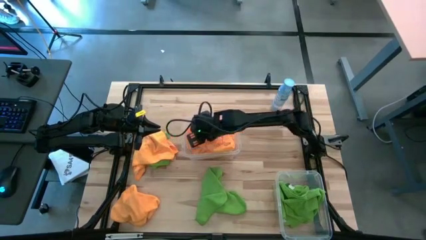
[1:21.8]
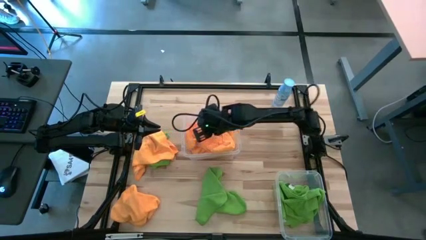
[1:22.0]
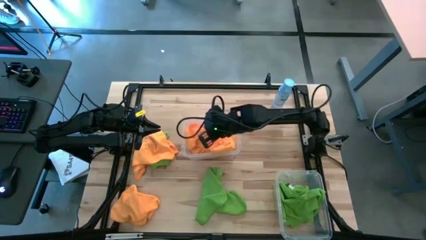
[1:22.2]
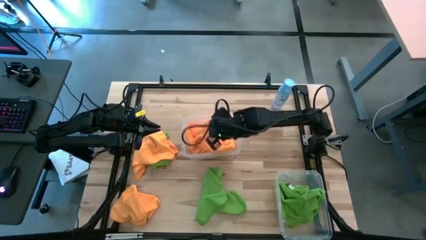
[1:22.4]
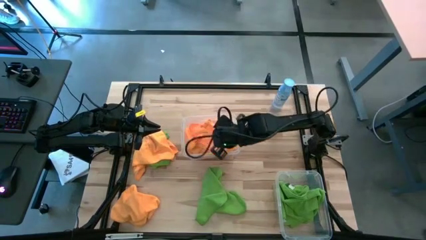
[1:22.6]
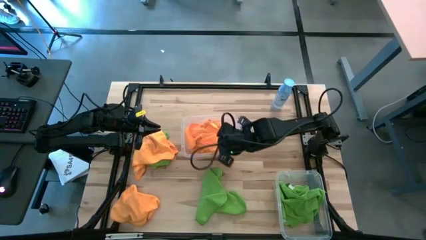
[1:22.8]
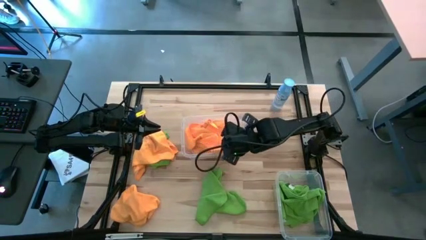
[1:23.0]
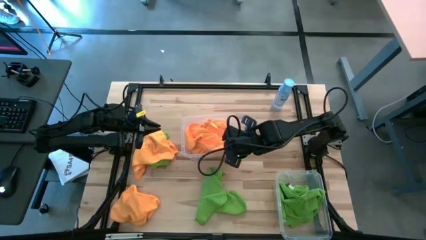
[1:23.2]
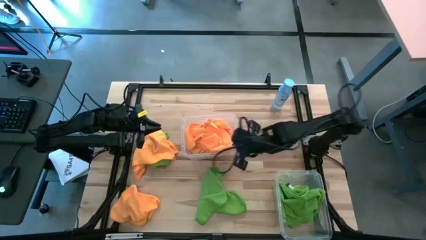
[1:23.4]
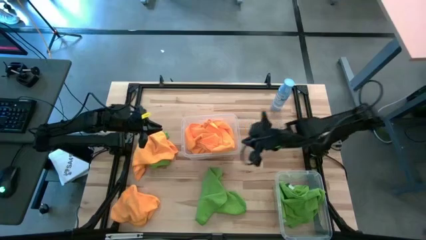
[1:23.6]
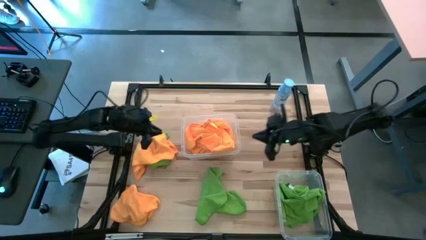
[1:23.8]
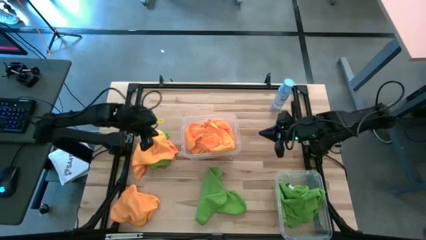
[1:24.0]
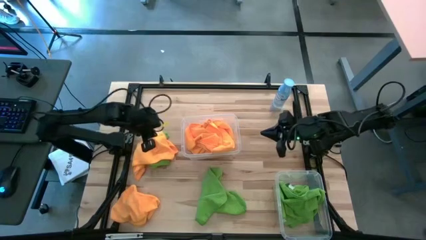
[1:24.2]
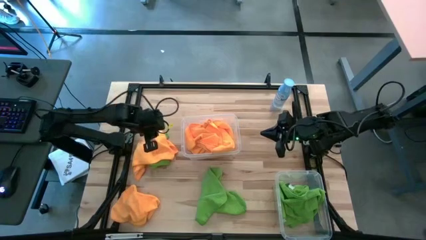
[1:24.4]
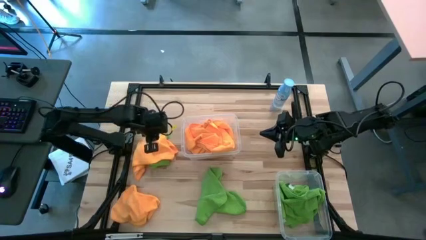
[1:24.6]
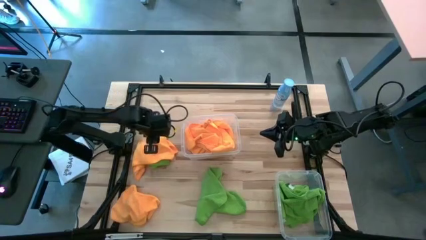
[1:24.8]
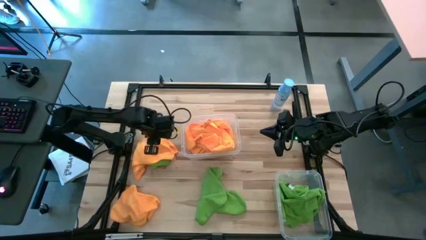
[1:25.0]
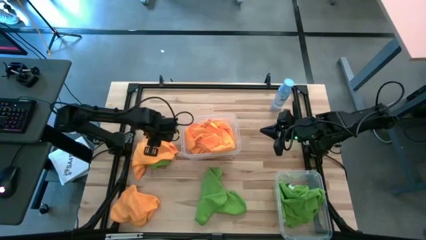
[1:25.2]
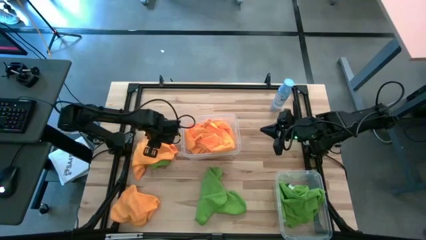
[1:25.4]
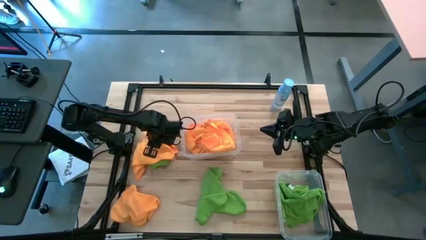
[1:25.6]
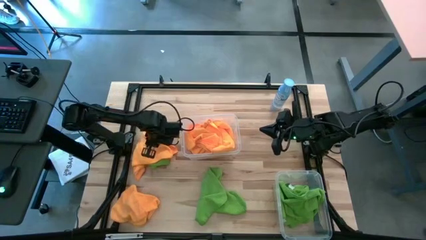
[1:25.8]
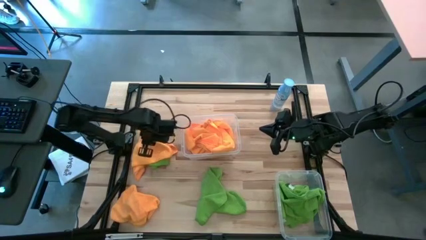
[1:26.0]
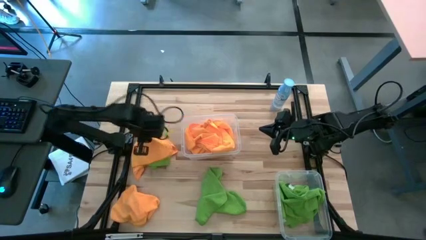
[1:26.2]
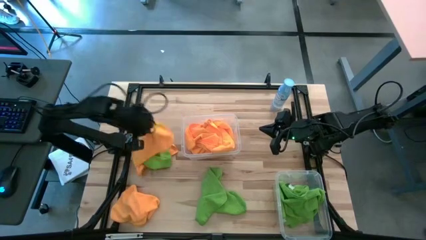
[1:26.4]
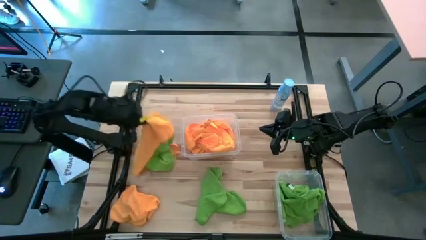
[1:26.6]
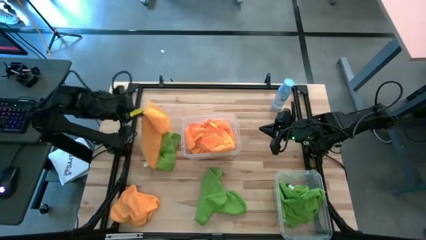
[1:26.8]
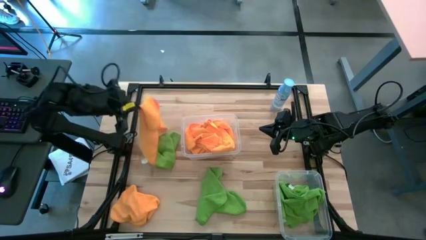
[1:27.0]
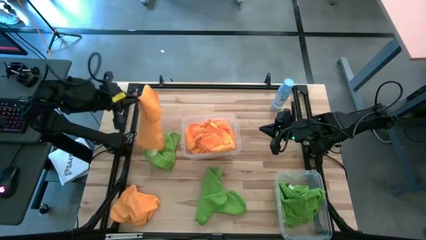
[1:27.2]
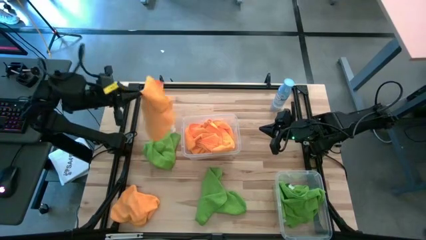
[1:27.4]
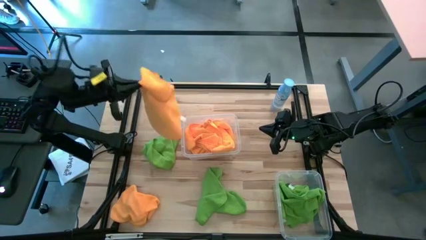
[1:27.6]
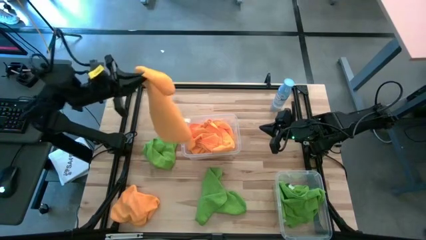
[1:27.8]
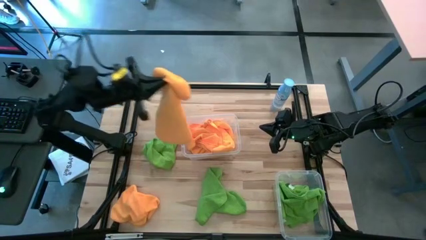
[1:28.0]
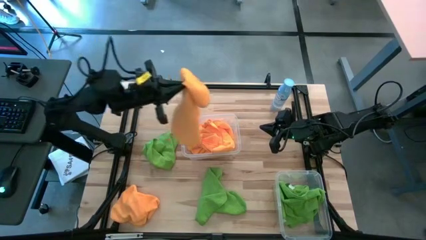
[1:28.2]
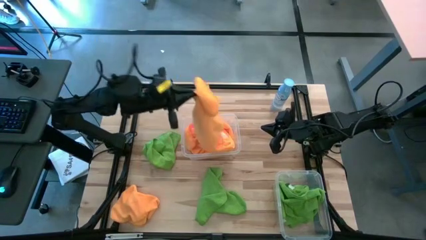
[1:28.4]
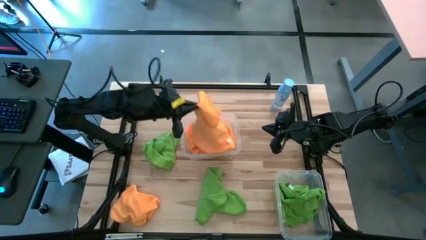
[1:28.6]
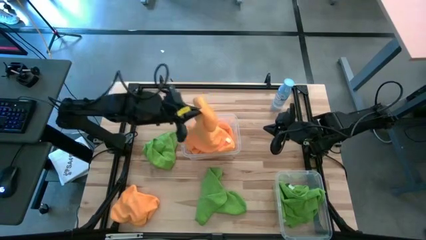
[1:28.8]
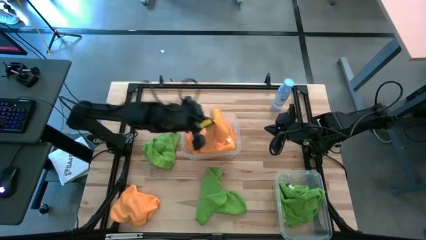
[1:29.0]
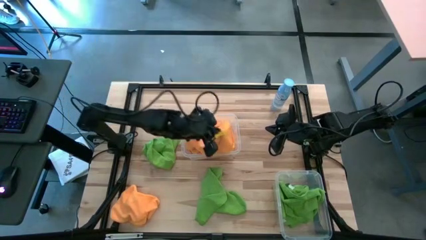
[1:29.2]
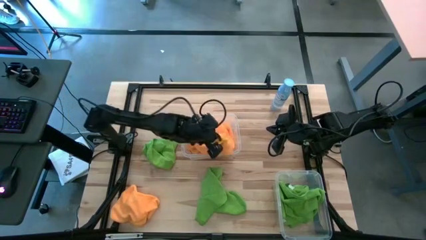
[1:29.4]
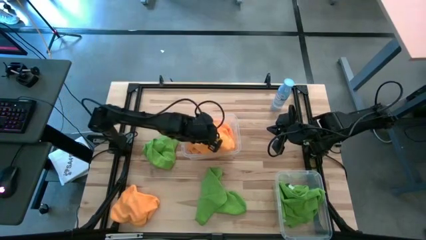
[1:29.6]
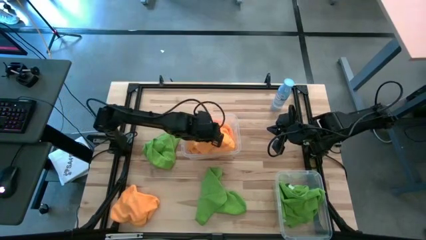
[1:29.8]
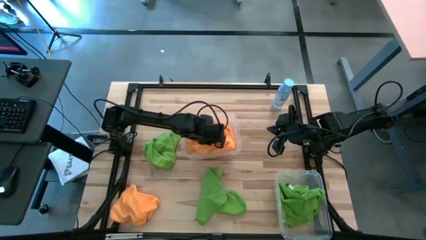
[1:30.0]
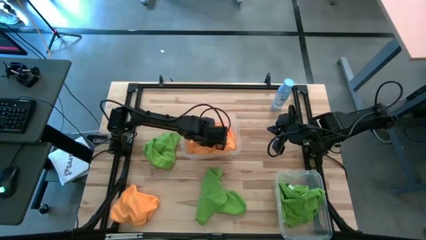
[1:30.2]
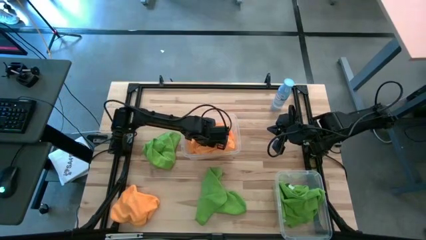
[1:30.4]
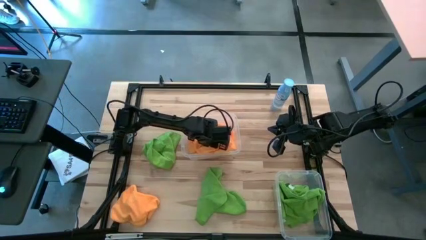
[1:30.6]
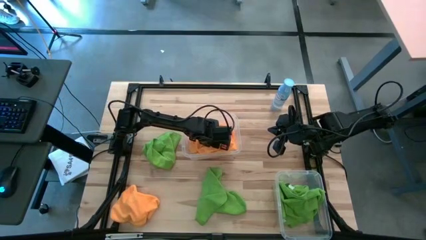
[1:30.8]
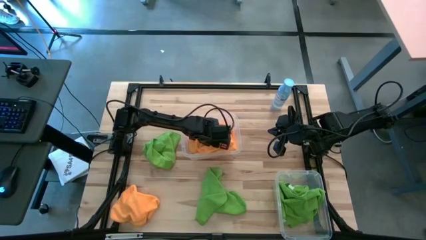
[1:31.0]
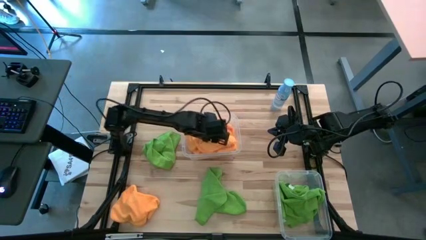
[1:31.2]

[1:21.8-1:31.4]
Task: Sort microfiber towel by color & place in baskets
Put the yellow microfiber cloth into the top transparent bin

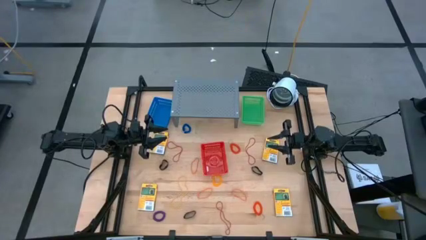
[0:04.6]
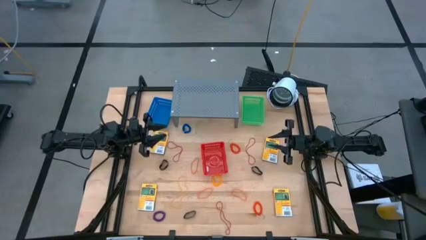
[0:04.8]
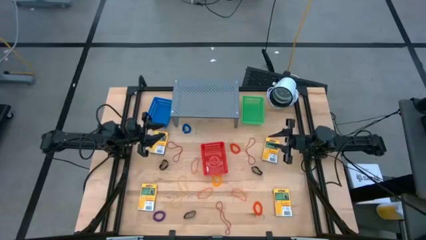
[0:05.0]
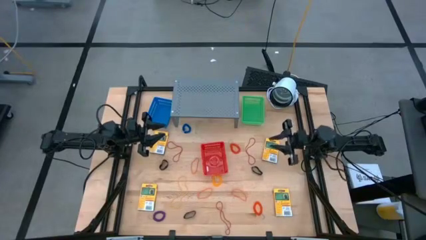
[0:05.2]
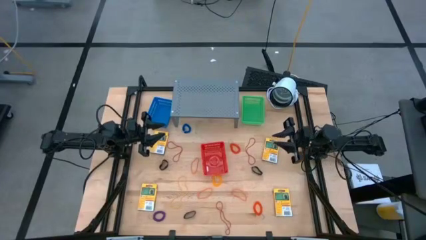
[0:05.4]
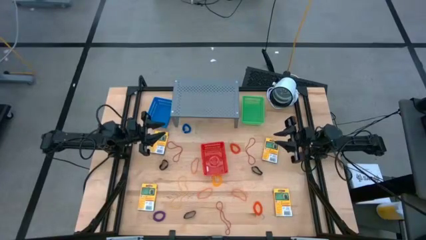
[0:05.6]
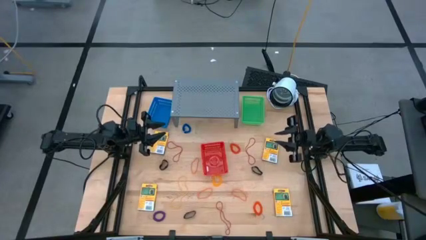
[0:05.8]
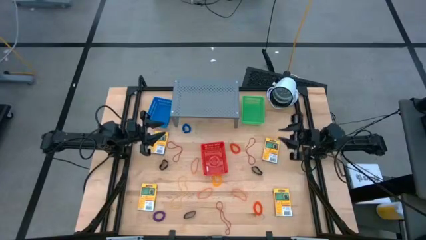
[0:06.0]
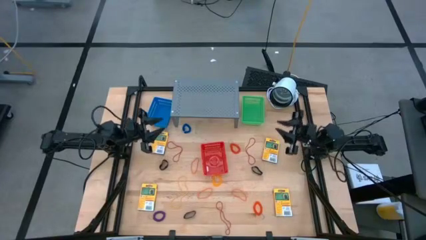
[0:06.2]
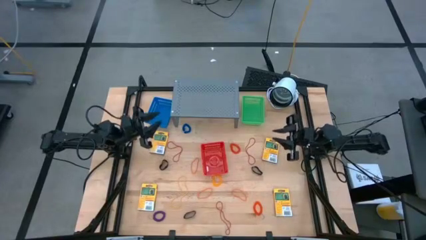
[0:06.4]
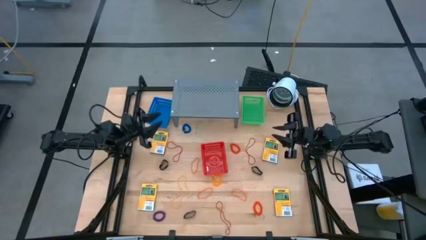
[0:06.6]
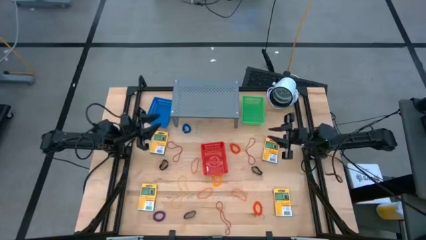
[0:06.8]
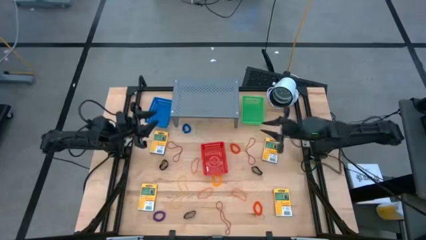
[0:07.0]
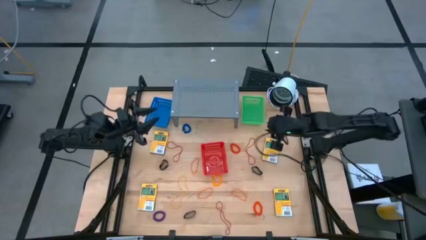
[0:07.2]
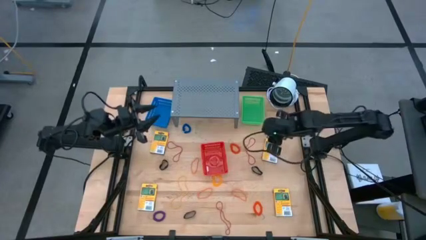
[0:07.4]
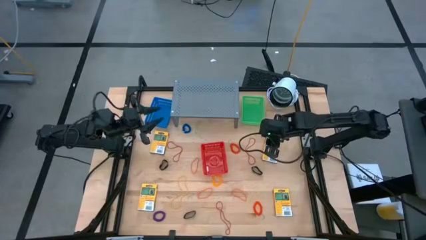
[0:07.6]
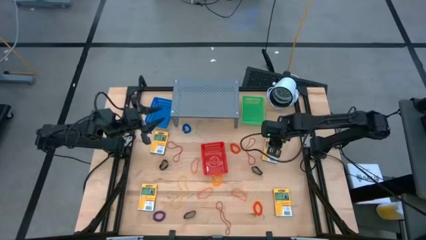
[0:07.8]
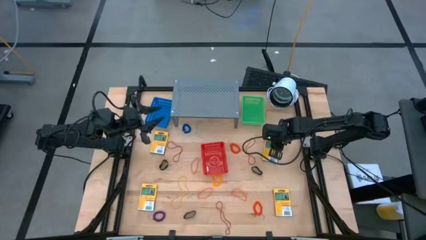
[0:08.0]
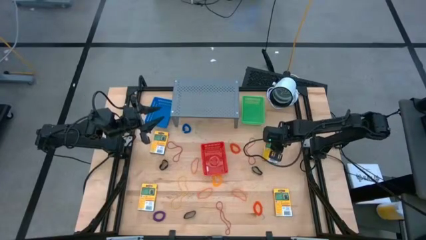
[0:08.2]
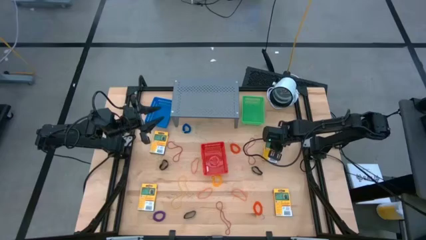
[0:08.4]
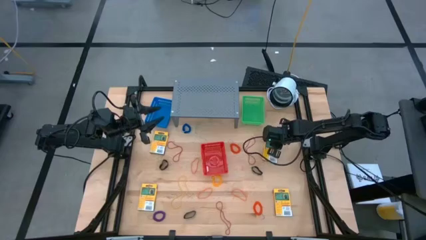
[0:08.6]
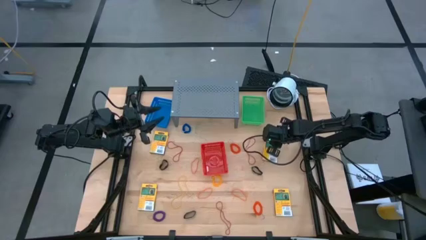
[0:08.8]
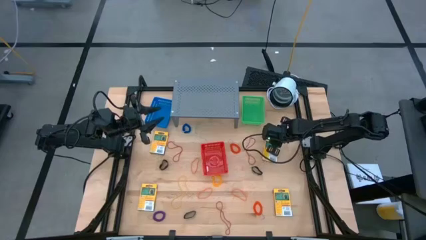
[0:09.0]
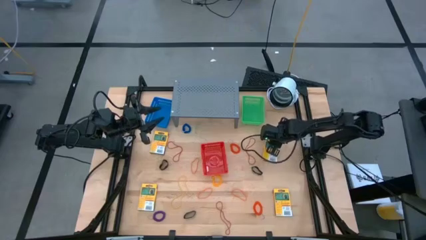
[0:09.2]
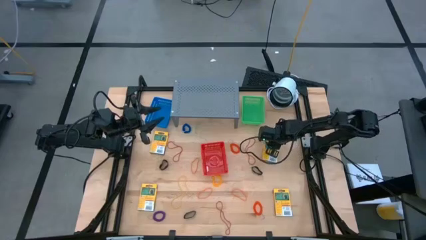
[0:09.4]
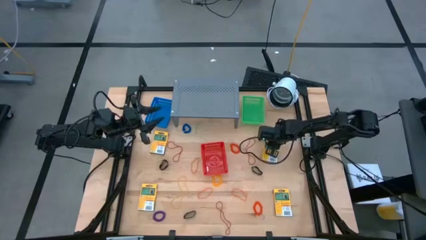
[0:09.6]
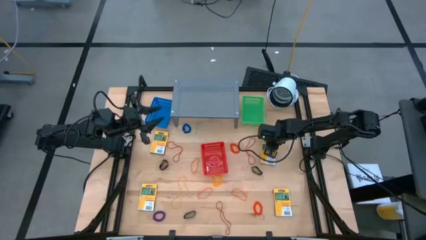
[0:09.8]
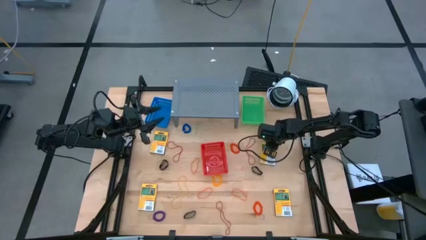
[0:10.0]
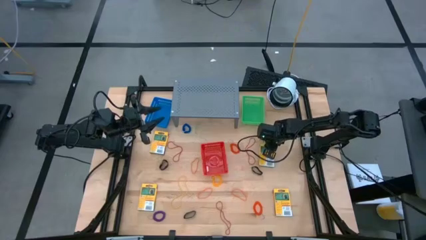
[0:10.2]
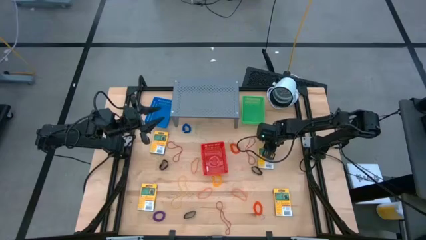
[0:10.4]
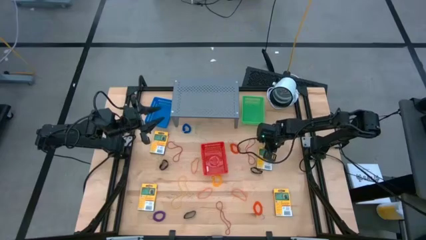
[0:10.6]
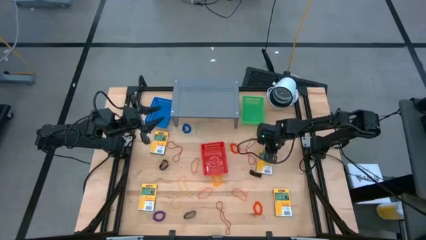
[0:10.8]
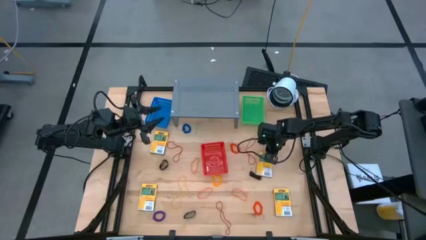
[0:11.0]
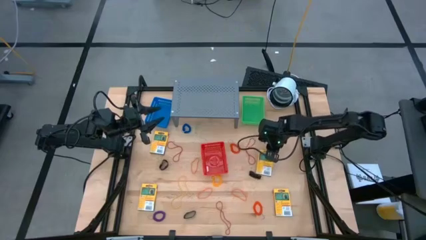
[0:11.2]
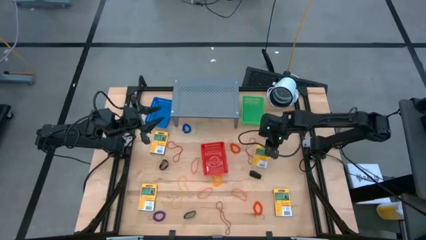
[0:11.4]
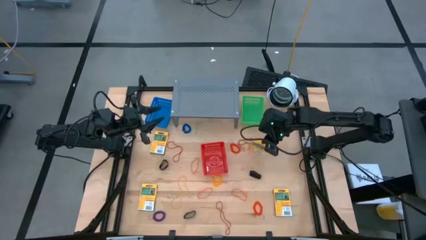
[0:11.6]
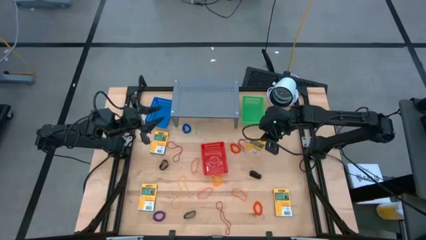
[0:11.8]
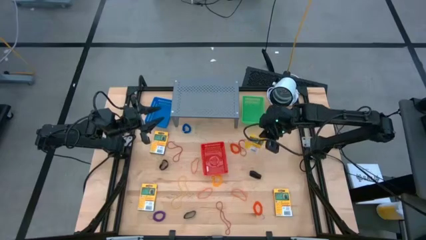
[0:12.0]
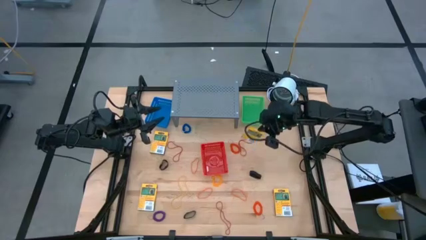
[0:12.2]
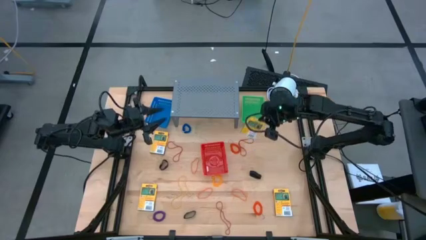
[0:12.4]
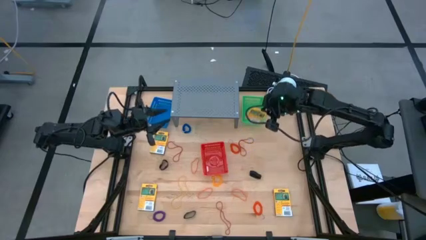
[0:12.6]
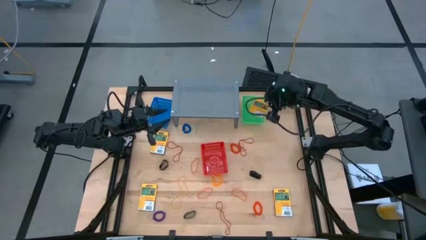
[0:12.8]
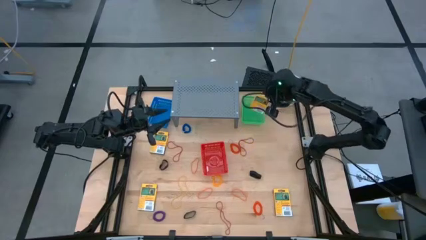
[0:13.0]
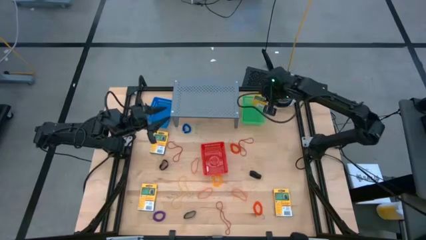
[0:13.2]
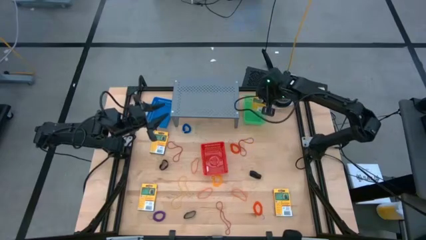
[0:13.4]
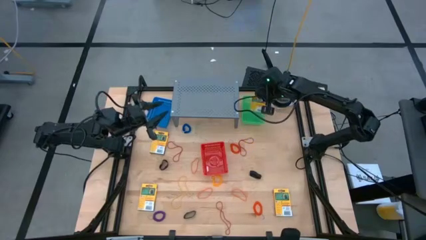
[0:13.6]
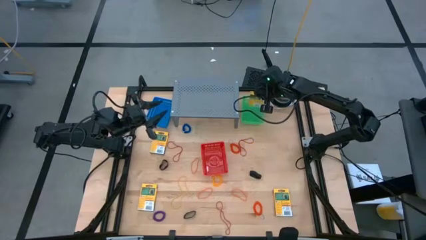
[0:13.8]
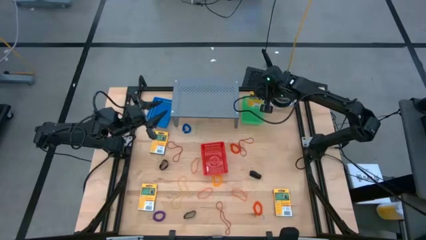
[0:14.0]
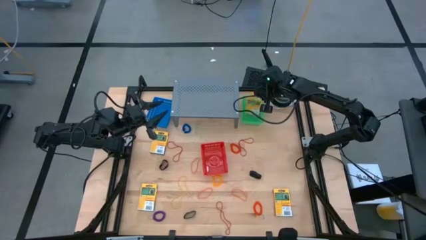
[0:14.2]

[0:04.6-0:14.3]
Task: Pick & Place Office Desk Supplies
Put the yellow crayon box into the green basket
